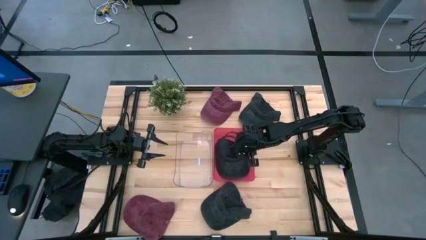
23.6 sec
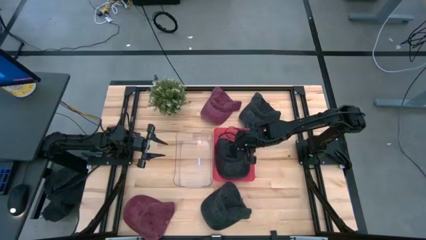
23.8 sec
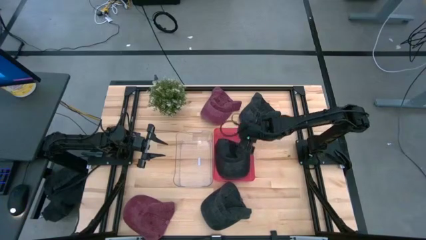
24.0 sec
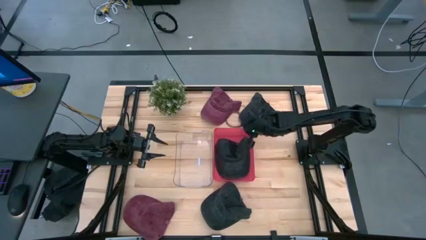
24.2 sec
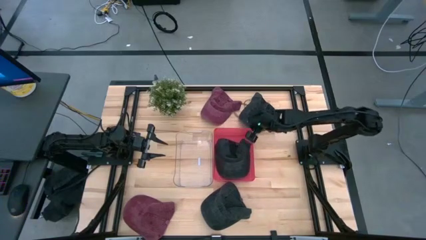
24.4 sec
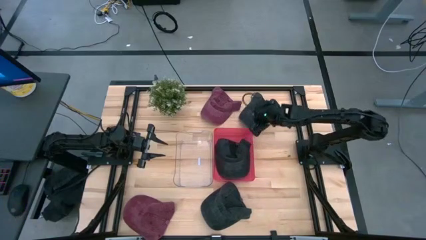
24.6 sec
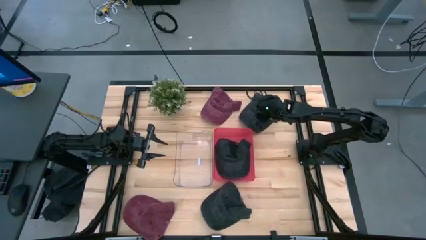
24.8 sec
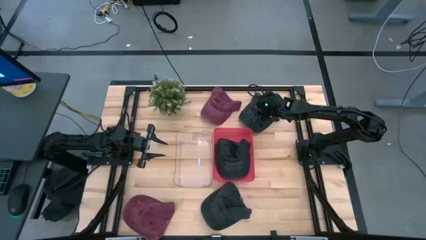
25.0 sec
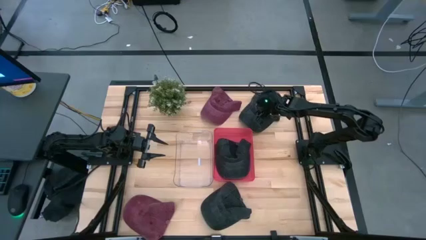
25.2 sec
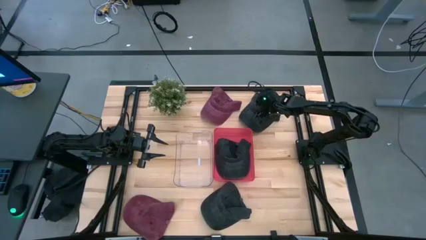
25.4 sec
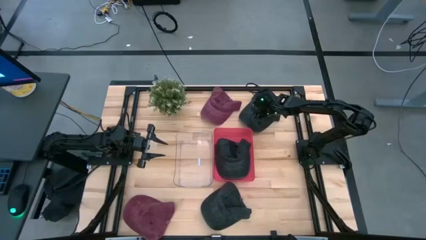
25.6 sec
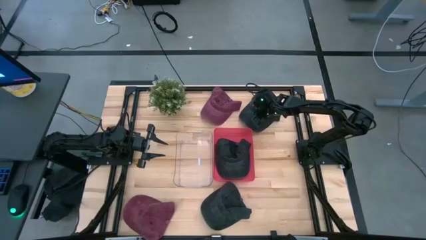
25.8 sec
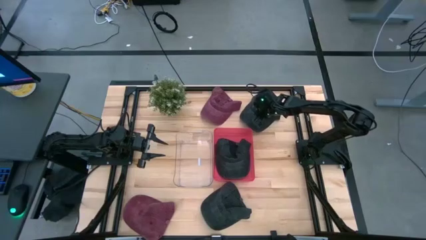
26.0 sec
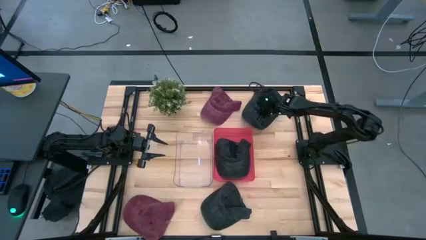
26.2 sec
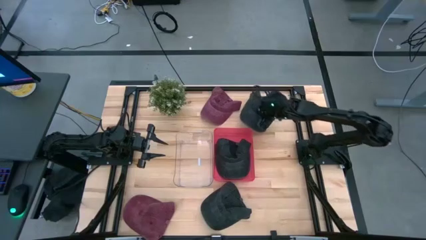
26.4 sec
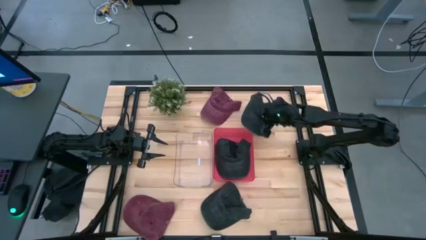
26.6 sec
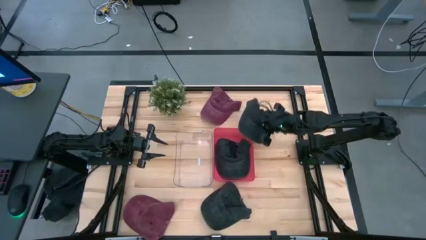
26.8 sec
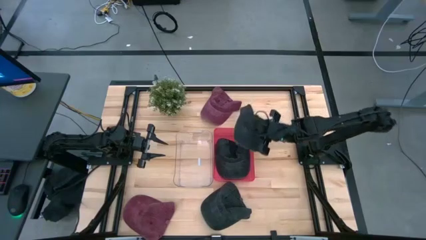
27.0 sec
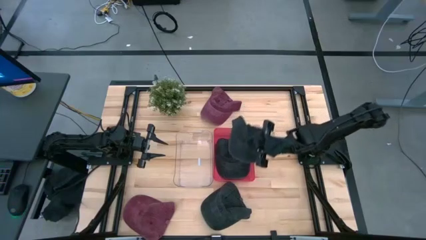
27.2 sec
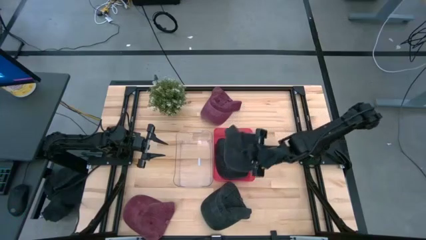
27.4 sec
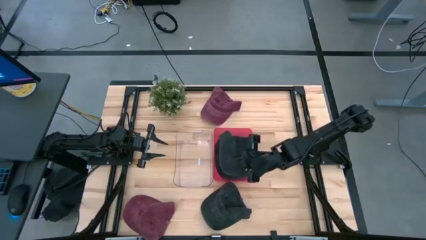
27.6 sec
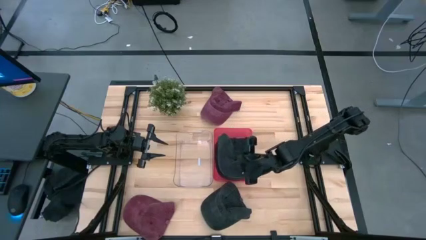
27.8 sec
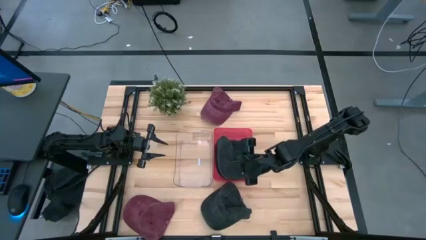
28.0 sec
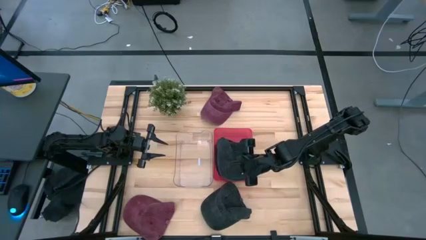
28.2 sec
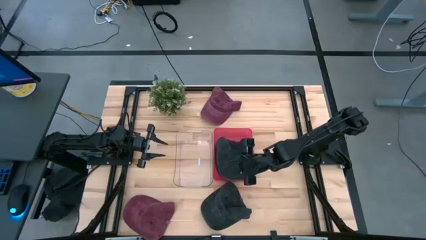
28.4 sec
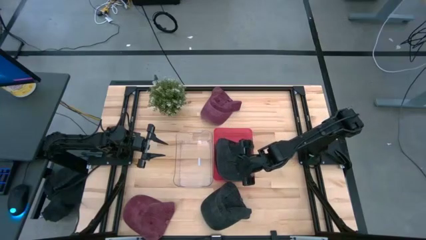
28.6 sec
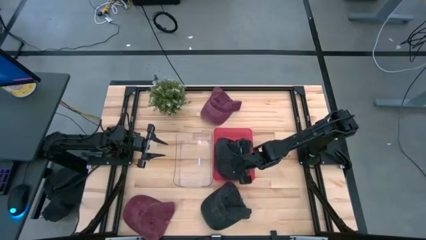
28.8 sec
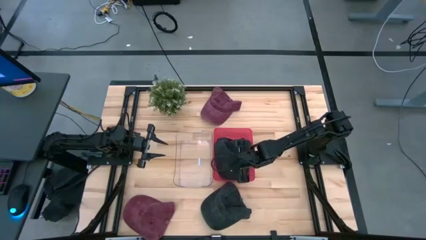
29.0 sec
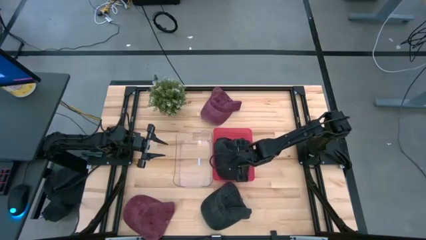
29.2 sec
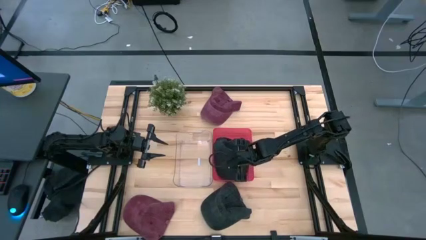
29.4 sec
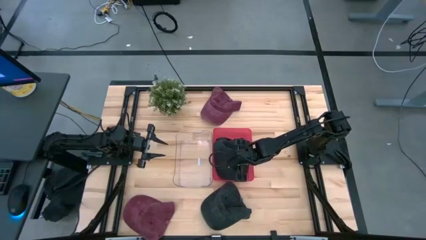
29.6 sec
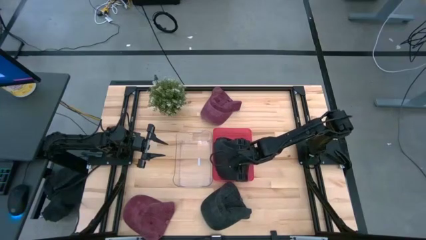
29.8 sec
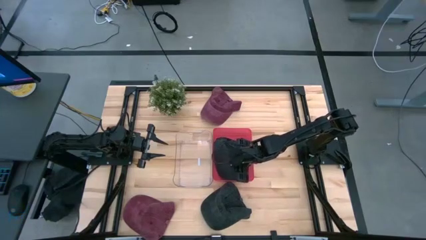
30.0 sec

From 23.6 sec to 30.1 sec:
Task: Pick & Place hat
Stack the top black cap onto the black cap in the red bin

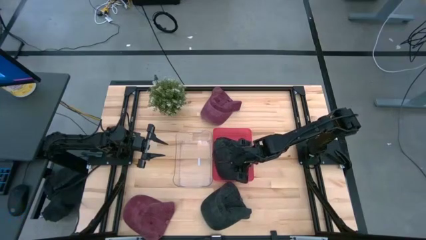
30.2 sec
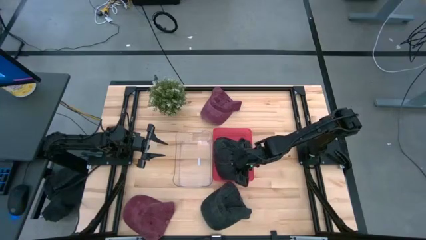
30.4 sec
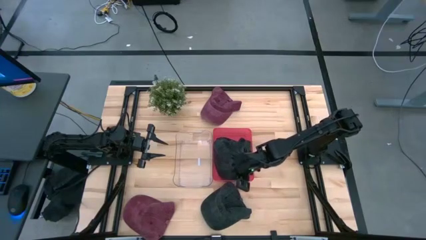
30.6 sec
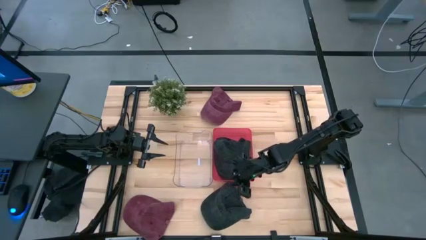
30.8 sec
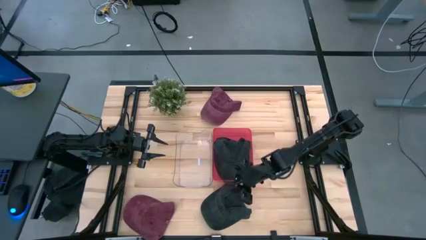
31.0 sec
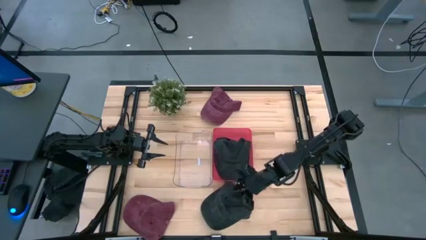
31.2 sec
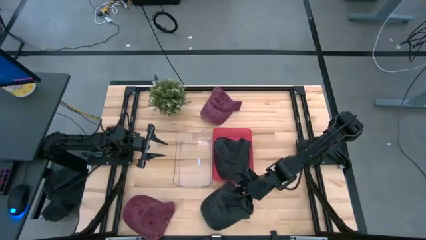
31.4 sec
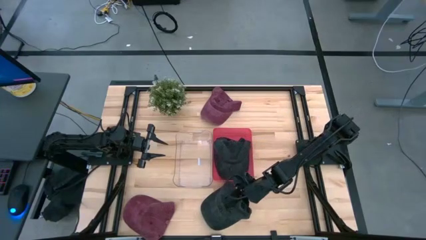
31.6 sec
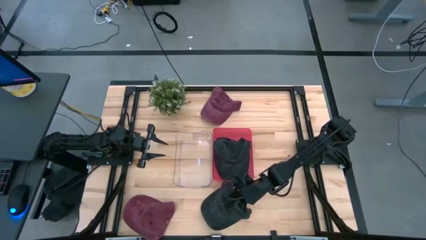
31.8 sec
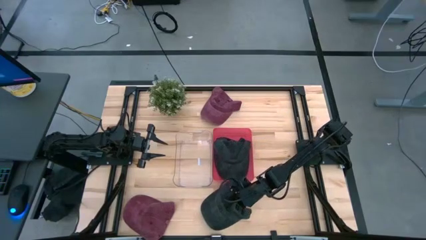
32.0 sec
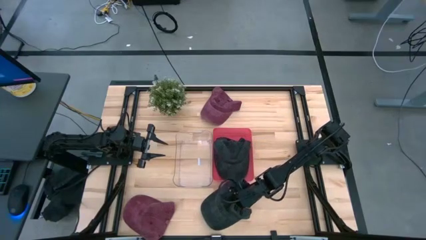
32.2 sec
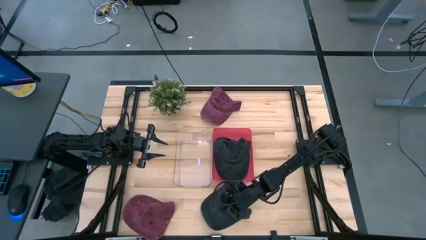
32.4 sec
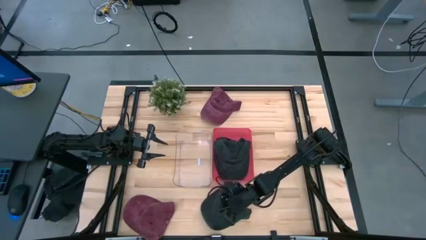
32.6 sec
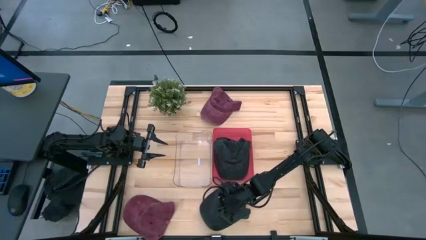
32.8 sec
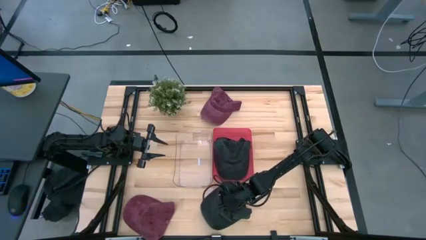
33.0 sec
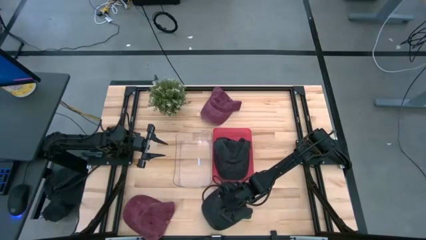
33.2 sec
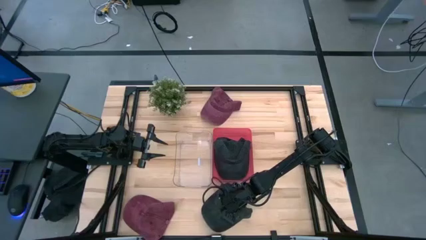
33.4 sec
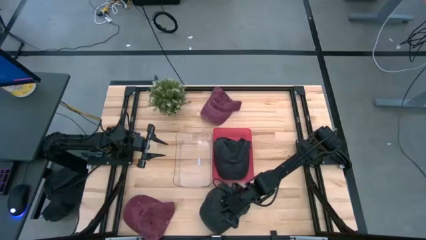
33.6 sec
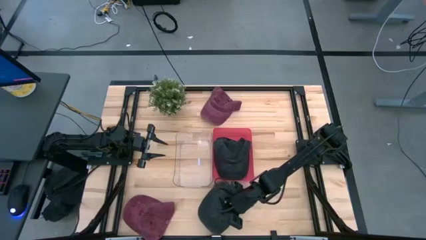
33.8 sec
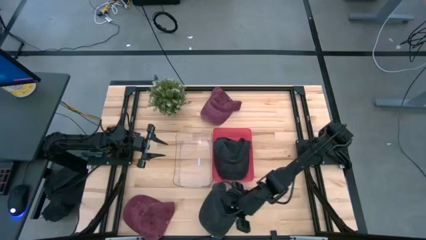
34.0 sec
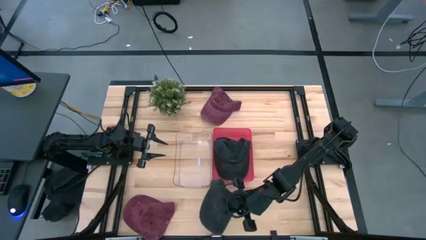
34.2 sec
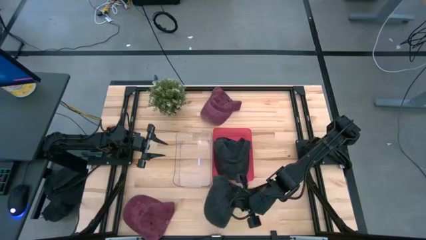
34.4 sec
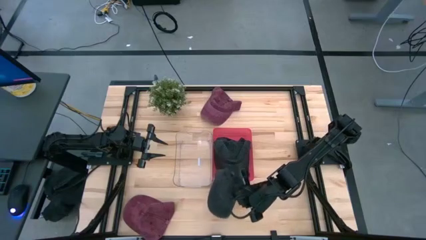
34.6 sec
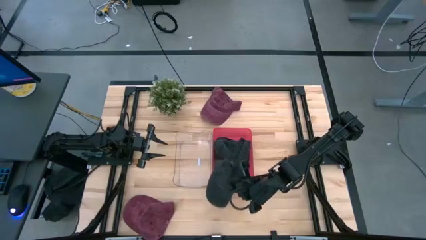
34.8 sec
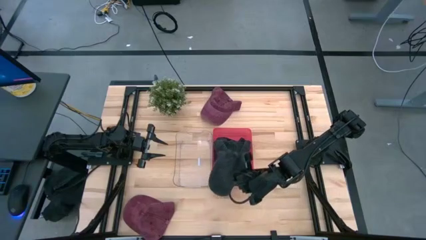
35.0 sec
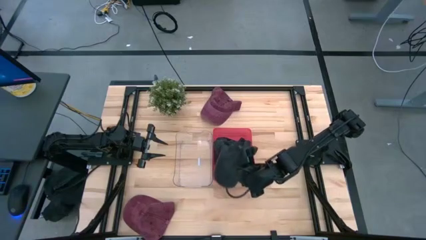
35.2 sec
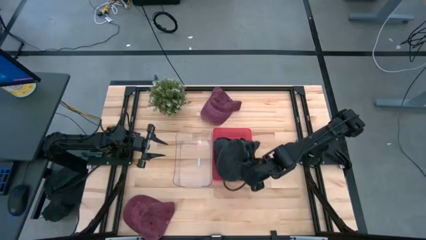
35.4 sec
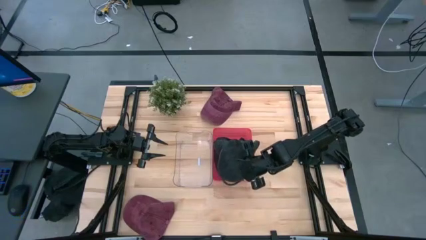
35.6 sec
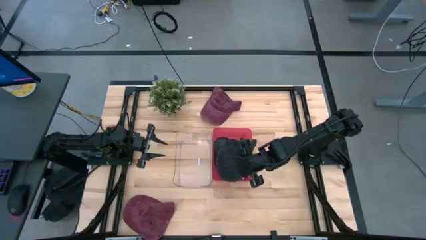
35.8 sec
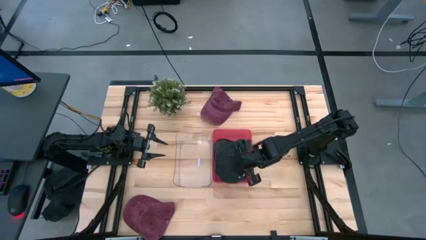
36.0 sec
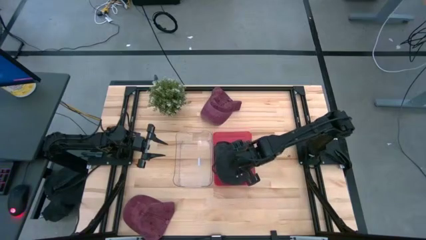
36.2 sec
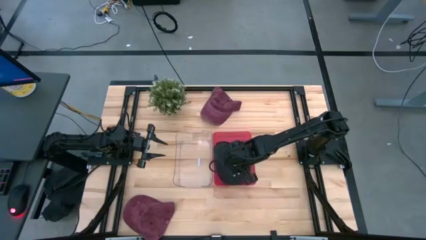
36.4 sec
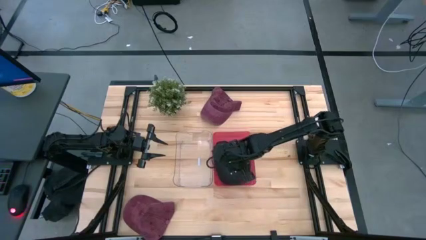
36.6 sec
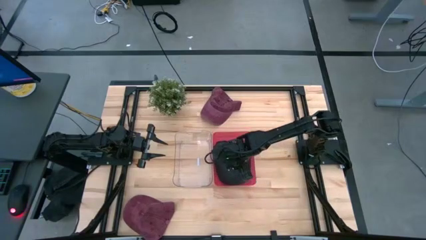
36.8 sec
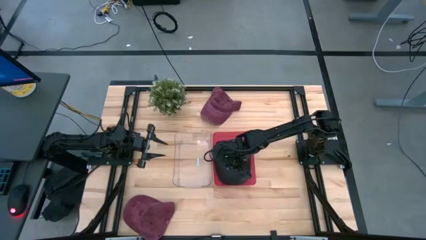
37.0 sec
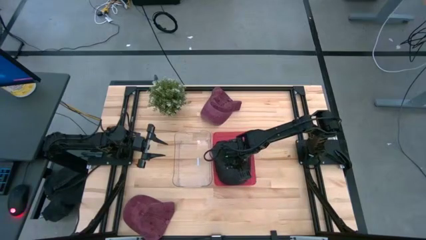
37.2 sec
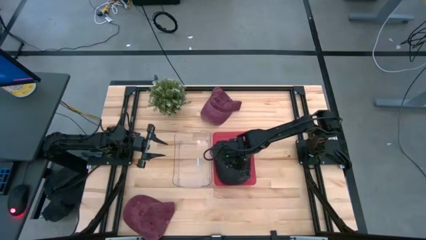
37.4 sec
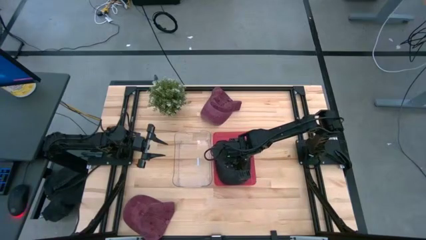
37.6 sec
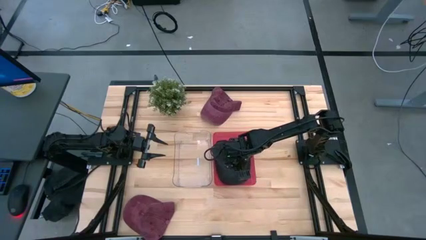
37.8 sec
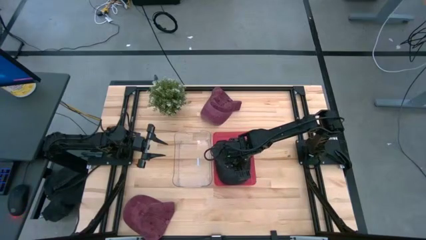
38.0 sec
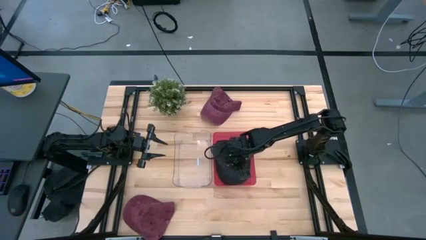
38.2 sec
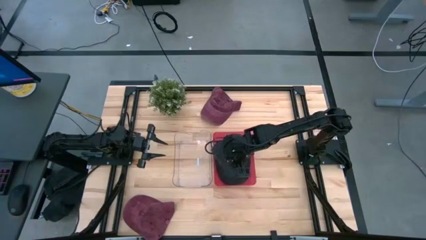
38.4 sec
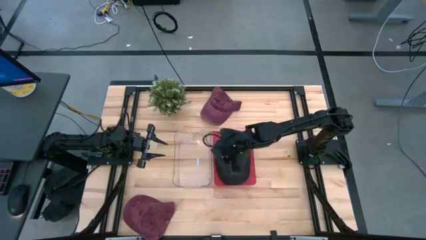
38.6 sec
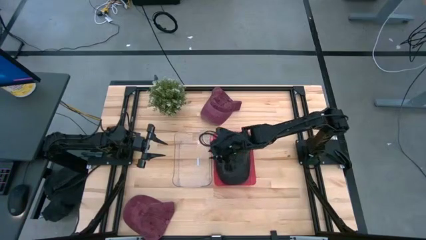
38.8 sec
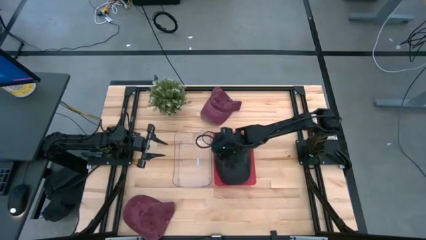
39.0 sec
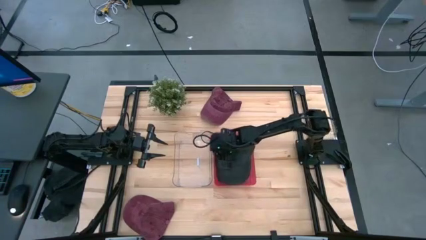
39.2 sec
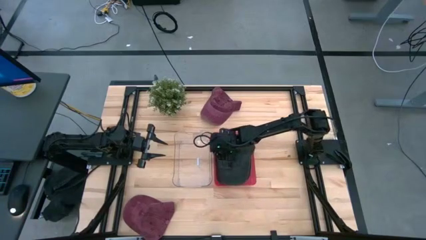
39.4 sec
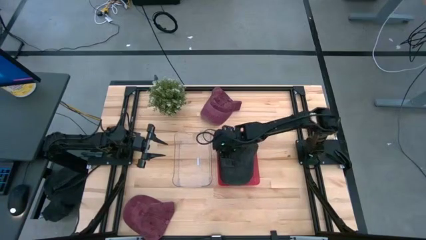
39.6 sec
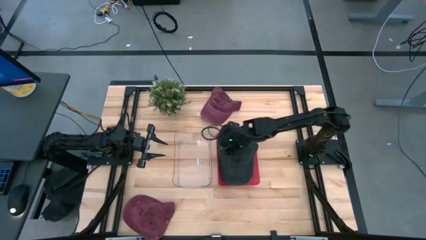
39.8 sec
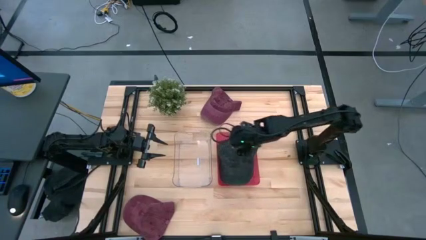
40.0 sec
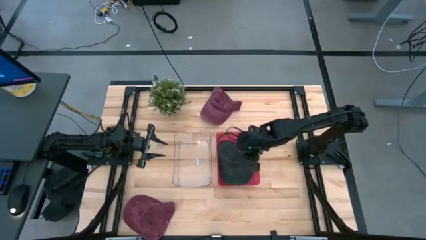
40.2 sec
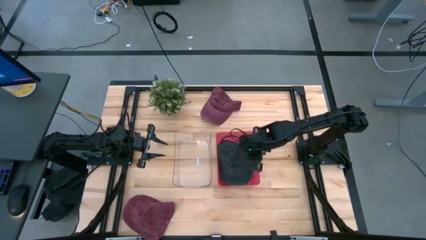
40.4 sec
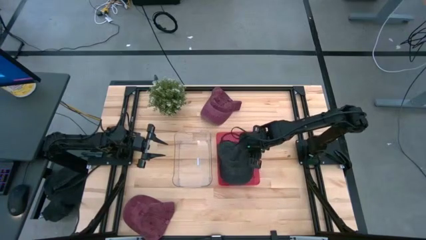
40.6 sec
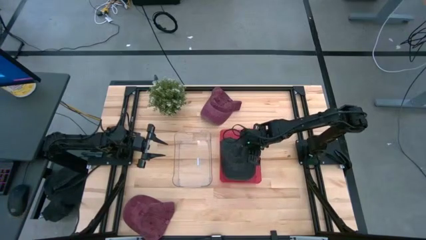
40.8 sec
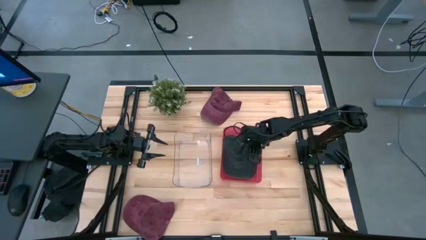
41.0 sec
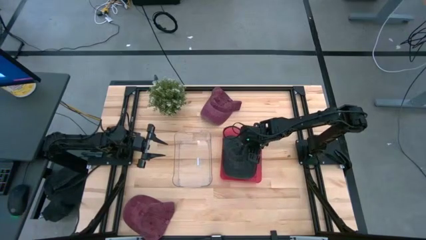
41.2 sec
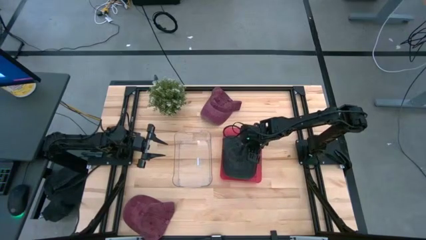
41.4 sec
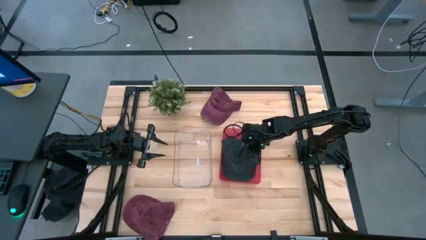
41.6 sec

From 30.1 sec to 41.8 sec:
Stack the top black cap onto the black cap in the red bin
